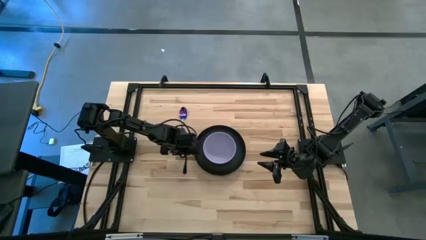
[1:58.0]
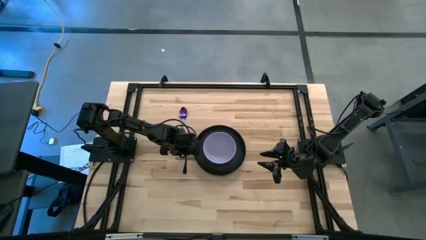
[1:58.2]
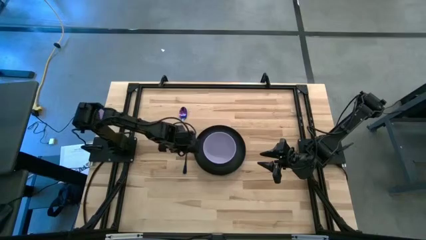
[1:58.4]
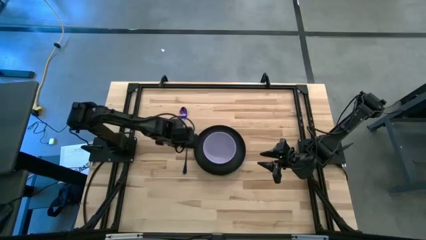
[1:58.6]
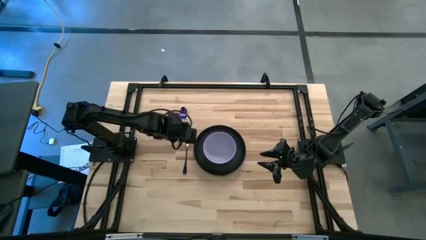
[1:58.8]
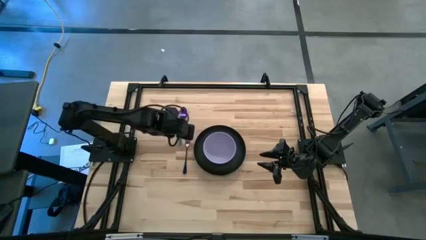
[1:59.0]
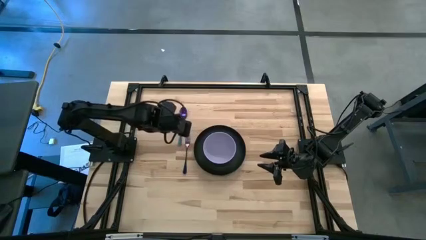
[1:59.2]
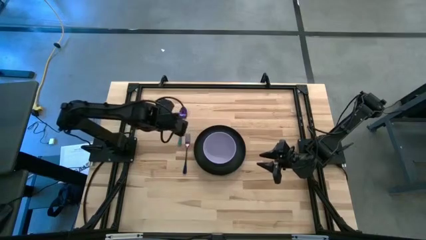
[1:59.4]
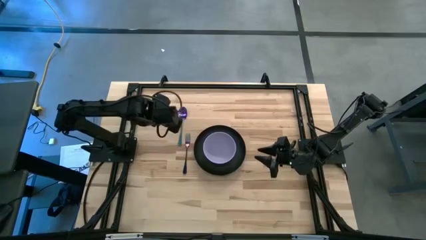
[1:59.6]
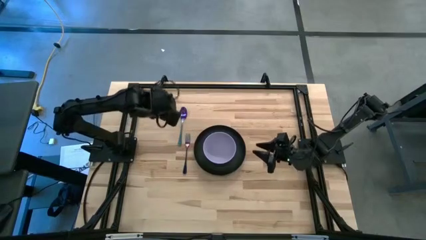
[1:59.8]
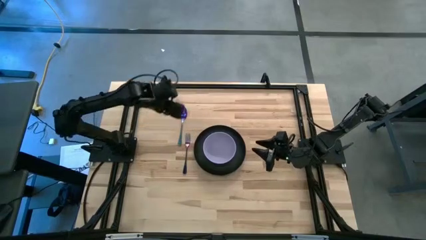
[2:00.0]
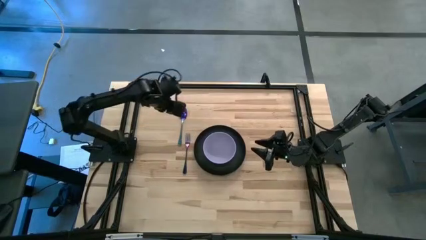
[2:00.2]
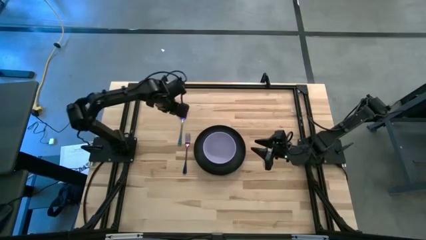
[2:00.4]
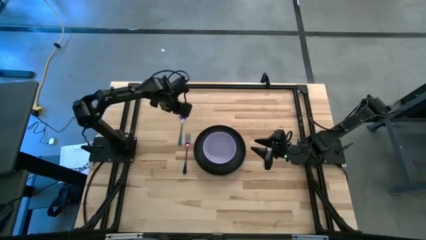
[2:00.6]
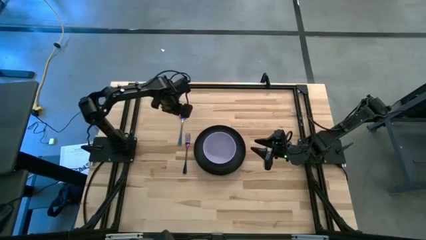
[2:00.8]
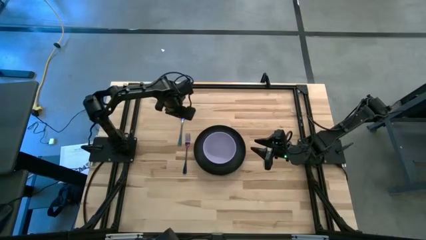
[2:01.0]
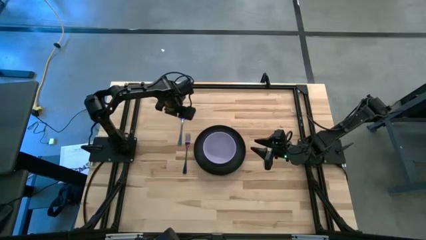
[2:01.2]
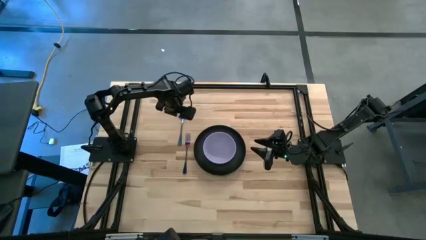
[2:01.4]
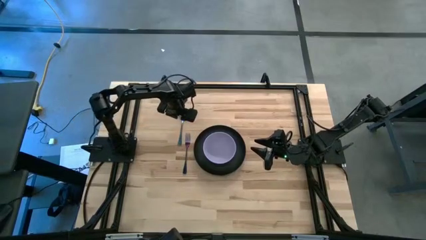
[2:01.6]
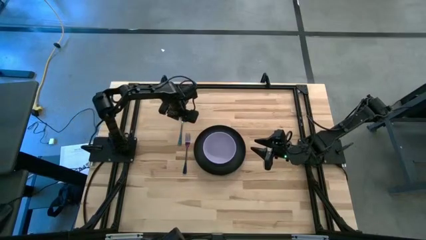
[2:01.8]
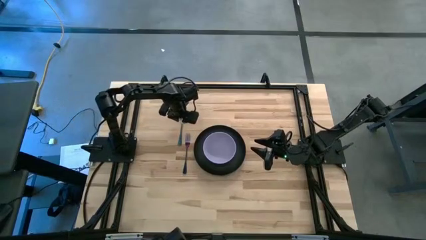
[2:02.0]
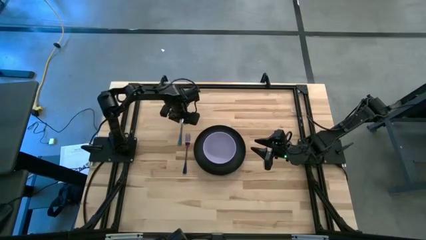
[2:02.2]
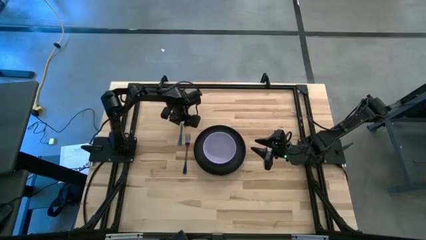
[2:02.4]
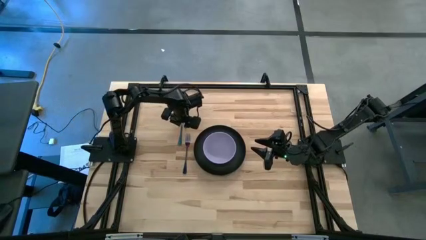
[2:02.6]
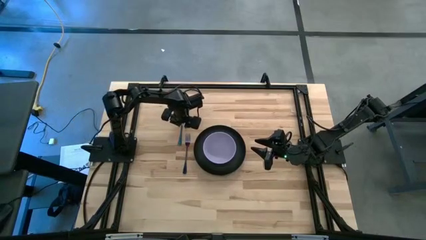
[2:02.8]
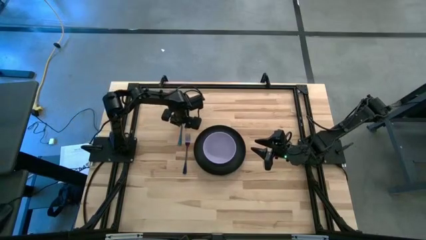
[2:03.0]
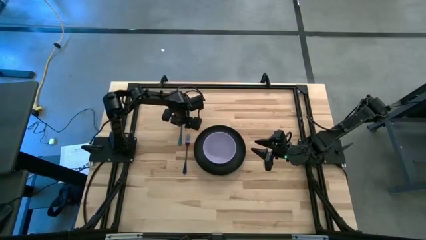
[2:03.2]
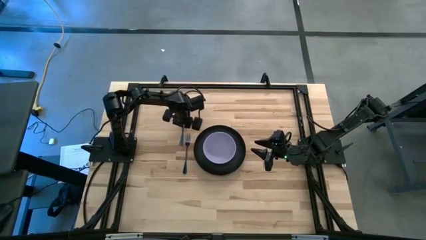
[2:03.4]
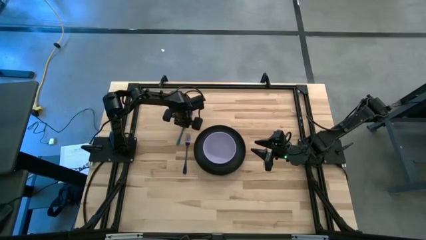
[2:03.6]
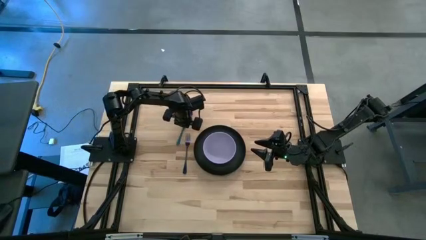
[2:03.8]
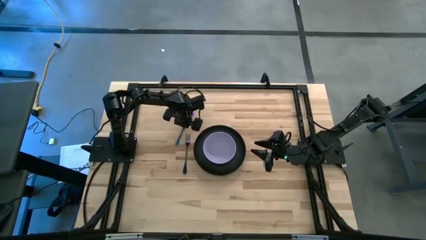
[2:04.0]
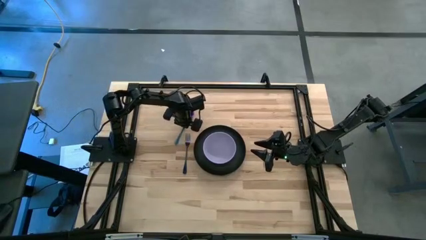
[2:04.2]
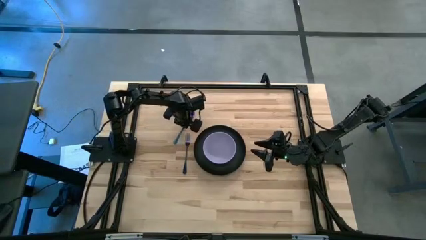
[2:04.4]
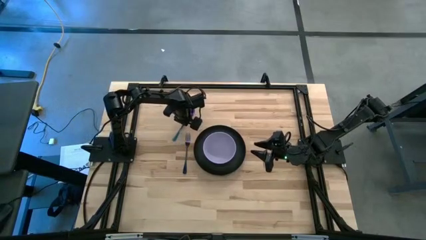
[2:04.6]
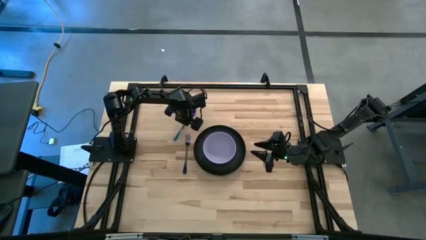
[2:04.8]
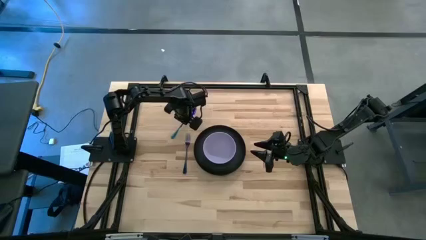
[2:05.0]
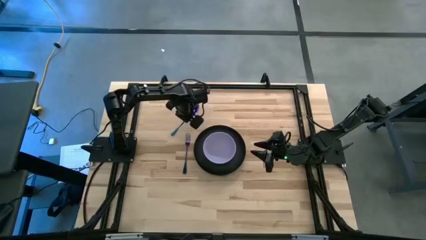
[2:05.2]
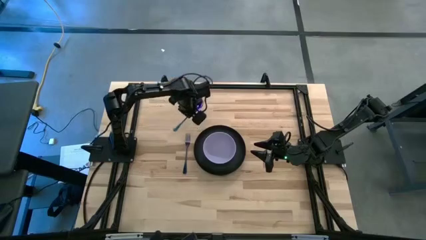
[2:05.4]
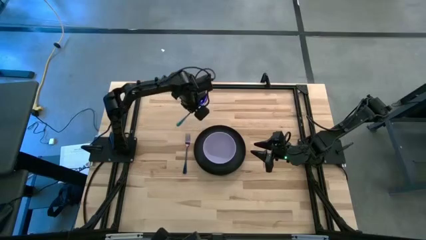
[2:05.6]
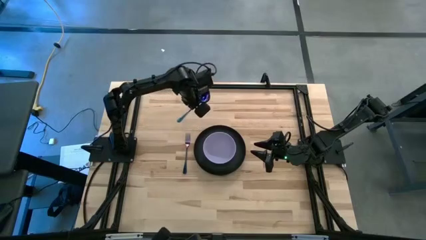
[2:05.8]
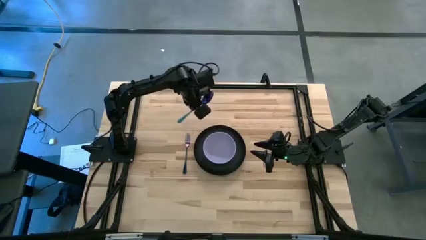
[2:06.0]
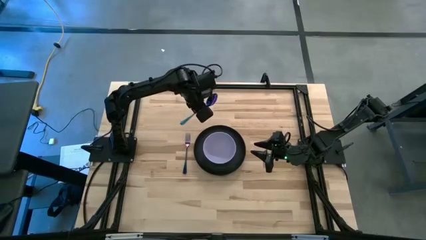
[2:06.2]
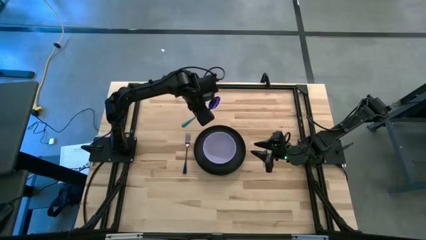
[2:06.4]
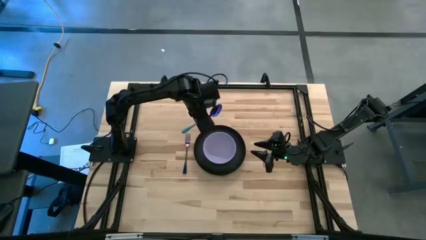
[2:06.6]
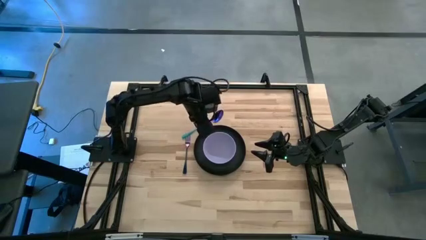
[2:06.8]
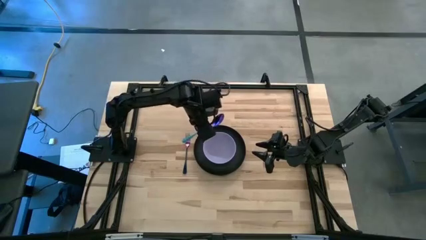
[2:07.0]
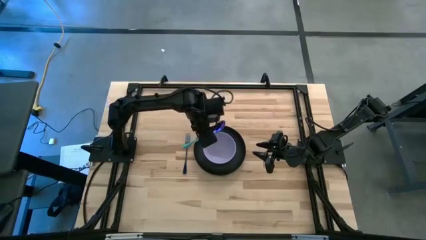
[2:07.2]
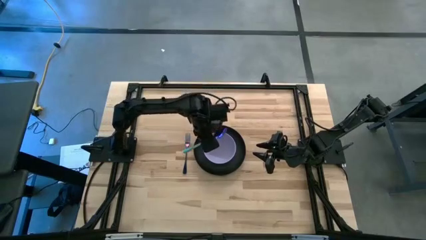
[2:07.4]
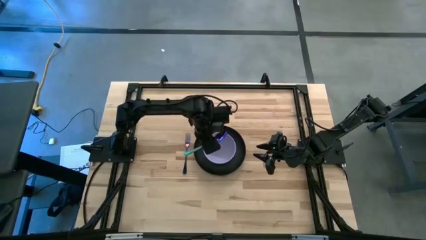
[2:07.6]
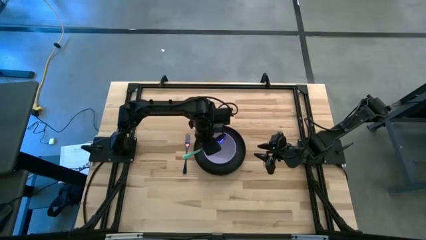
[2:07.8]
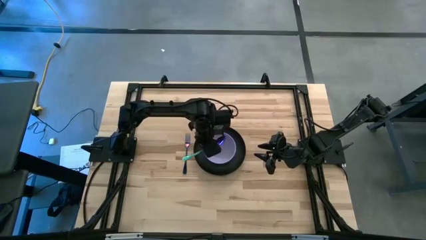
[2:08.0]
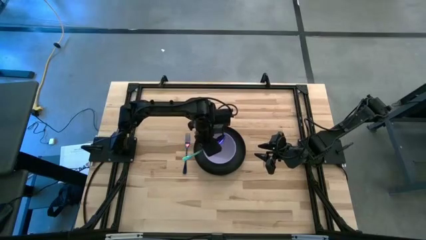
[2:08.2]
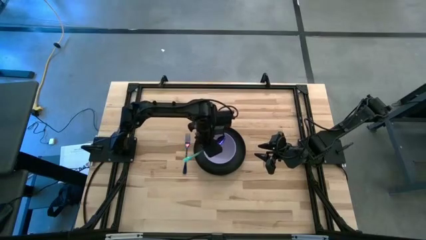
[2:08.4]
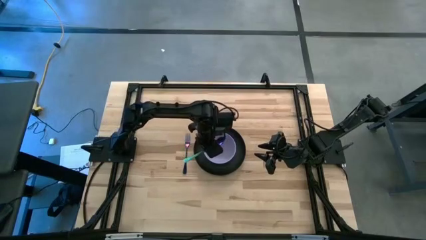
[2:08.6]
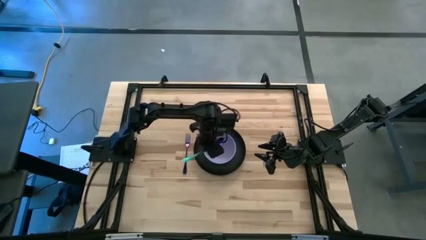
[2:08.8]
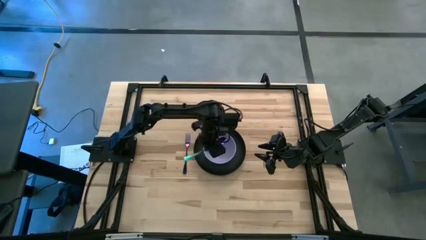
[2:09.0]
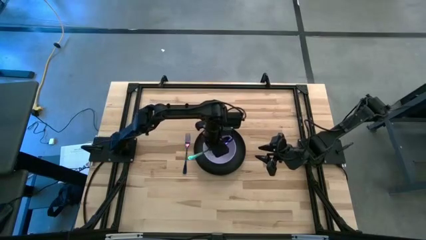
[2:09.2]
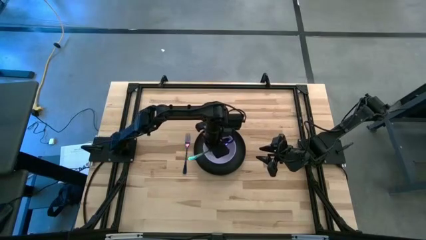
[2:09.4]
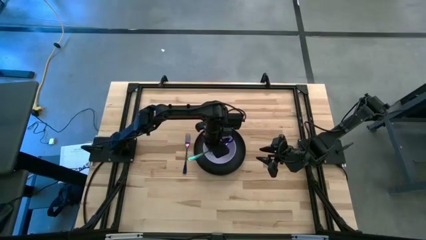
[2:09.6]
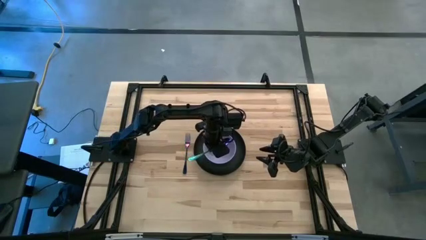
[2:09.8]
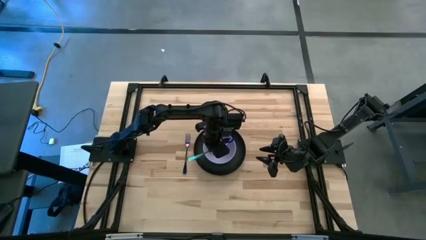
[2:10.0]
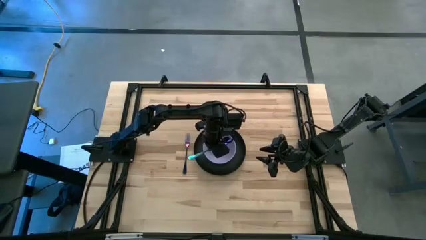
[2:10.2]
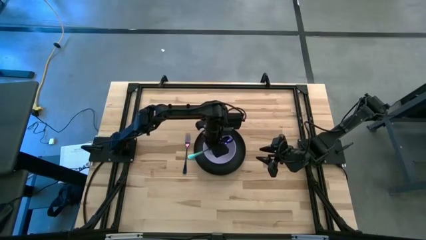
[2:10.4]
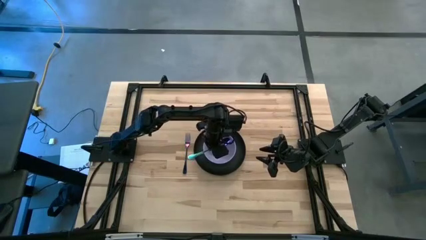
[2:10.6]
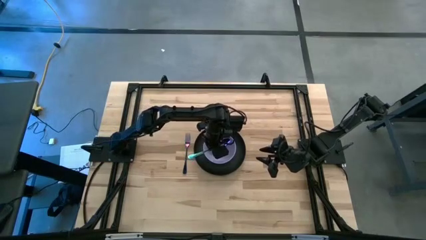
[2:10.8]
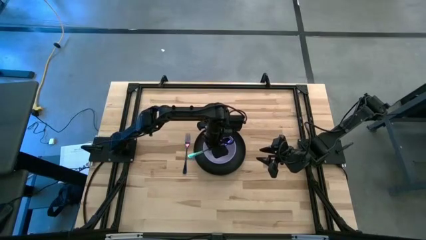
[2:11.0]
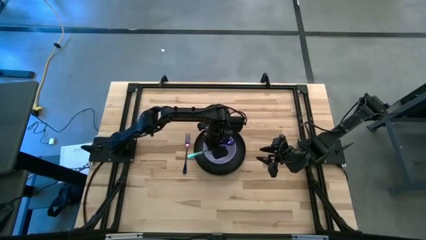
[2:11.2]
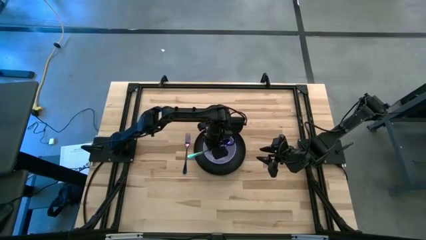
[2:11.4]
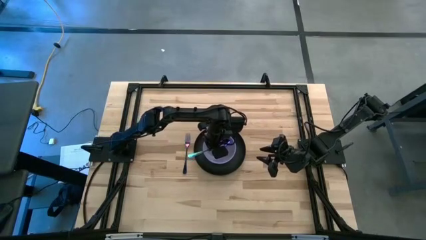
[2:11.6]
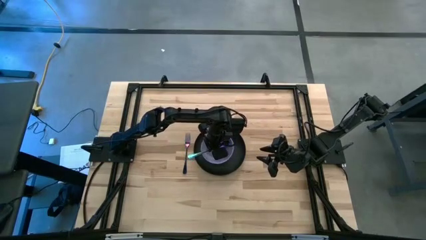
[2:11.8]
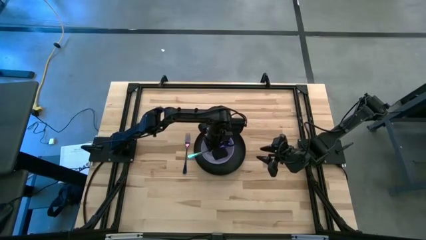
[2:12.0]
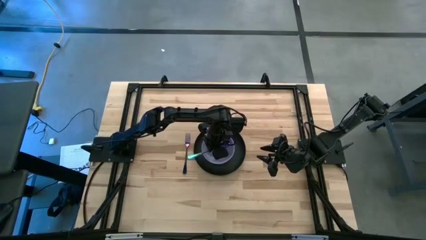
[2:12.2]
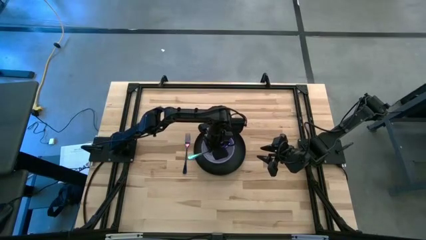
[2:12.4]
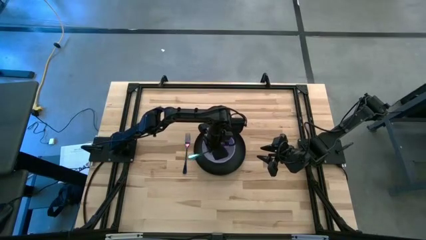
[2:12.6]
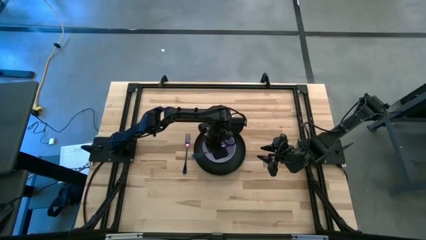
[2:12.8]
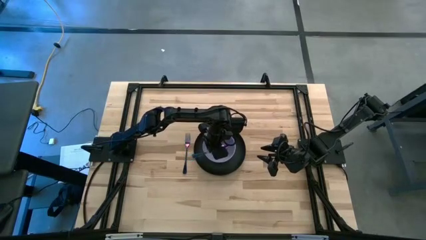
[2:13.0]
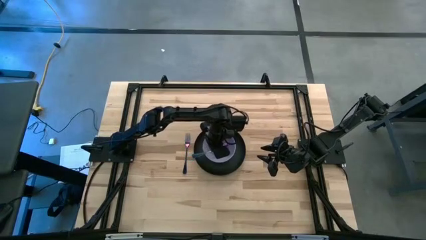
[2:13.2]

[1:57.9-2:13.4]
Task: Set table place
Put the blue spoon into the violet bowl

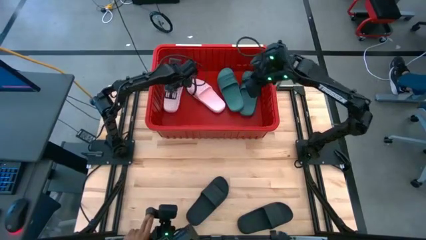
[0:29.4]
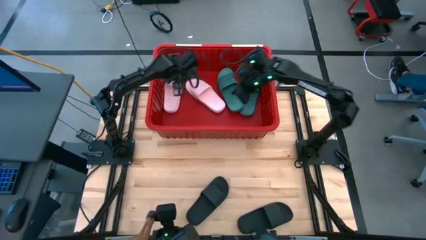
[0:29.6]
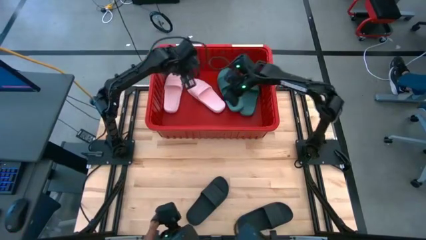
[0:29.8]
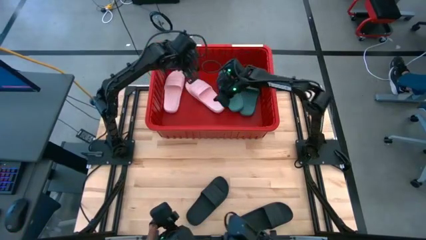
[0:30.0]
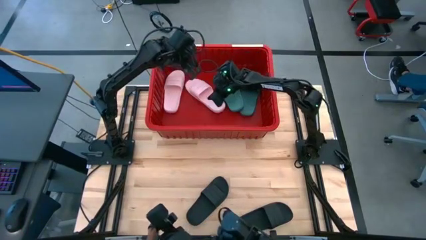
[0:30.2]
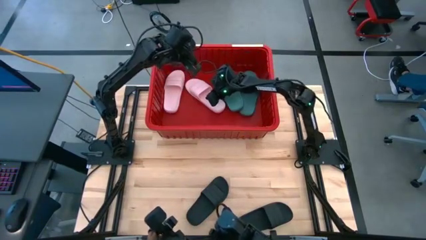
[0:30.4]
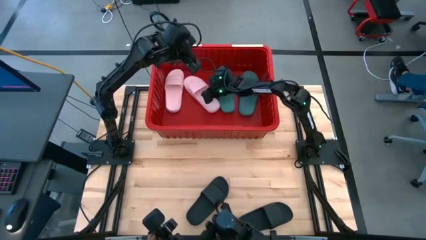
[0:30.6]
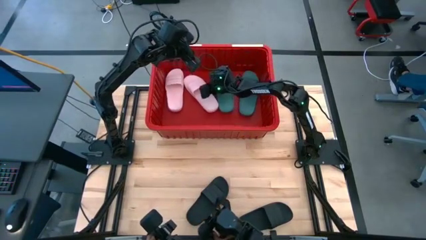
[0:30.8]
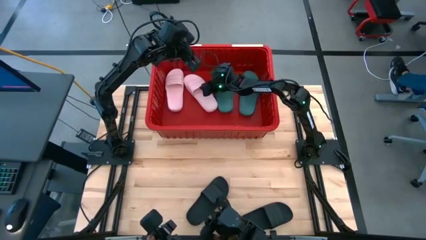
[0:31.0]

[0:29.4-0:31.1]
Task: Pick and place slides into bin
Adjust the right pink slide in the red bin
